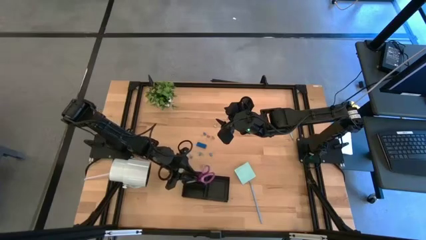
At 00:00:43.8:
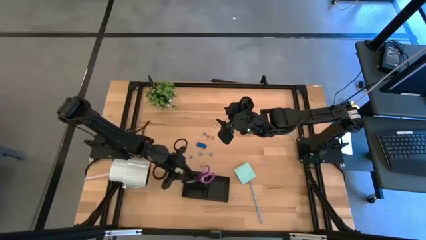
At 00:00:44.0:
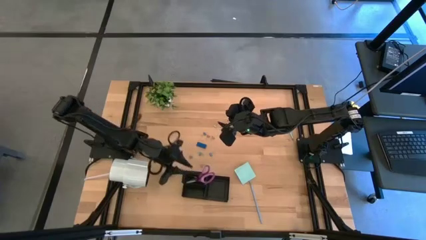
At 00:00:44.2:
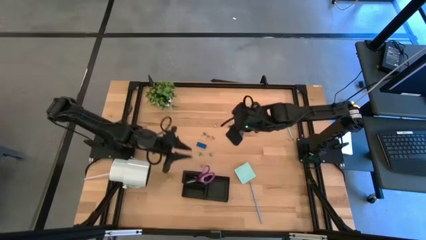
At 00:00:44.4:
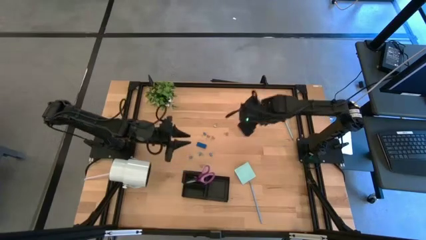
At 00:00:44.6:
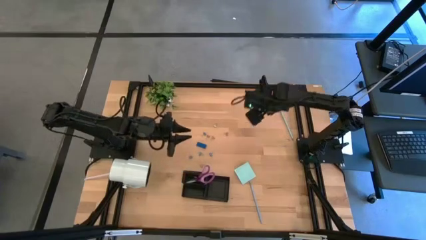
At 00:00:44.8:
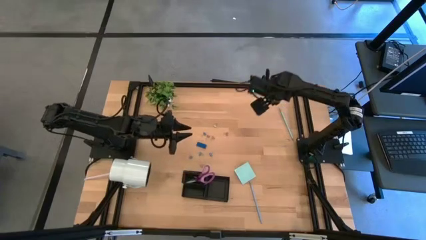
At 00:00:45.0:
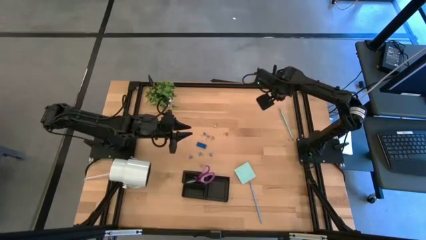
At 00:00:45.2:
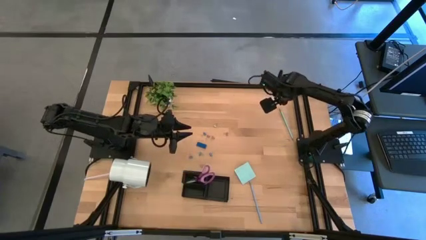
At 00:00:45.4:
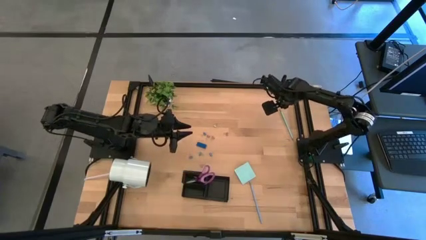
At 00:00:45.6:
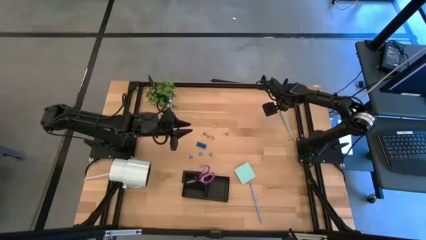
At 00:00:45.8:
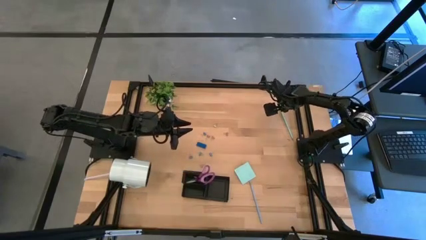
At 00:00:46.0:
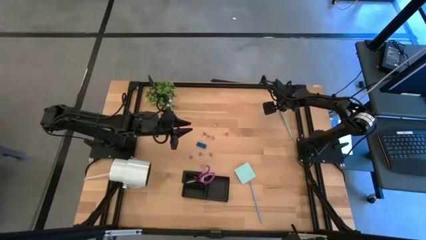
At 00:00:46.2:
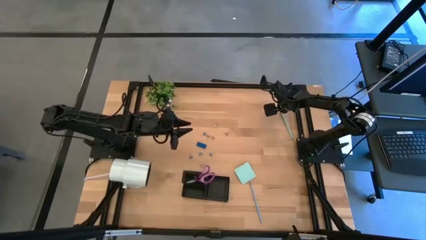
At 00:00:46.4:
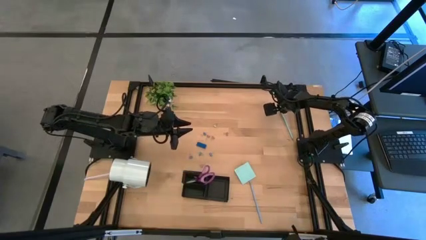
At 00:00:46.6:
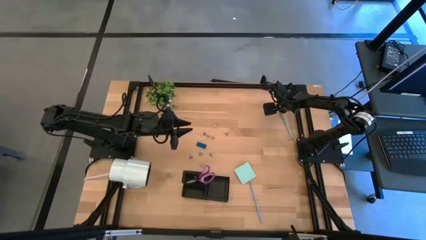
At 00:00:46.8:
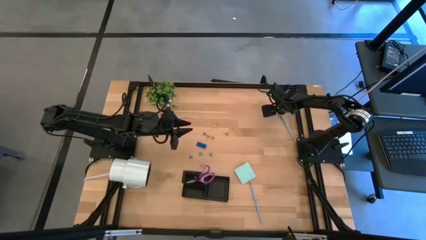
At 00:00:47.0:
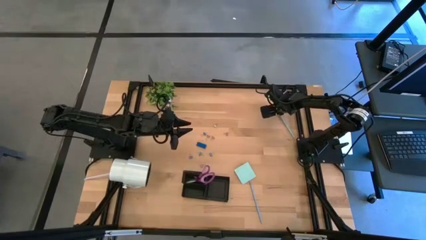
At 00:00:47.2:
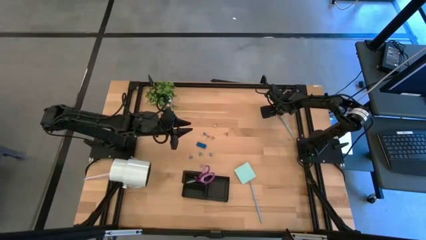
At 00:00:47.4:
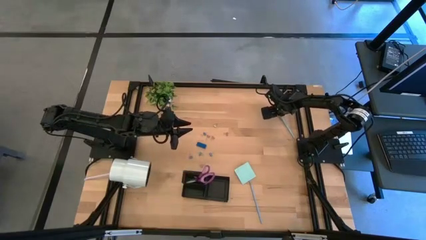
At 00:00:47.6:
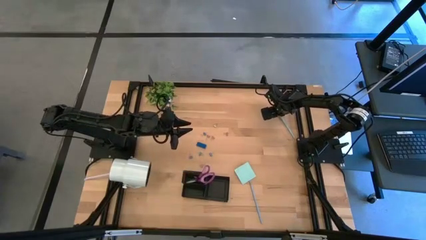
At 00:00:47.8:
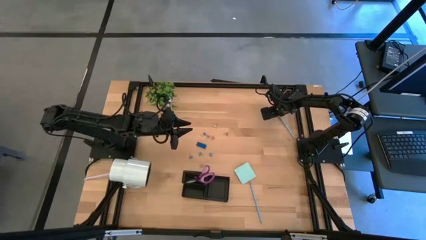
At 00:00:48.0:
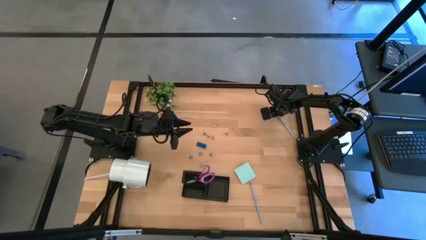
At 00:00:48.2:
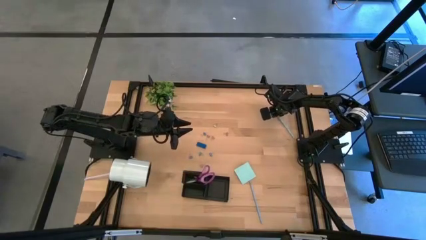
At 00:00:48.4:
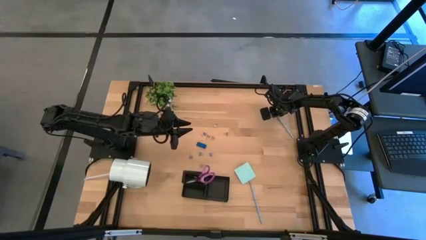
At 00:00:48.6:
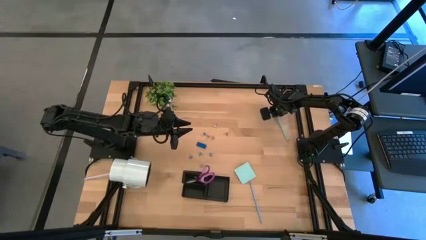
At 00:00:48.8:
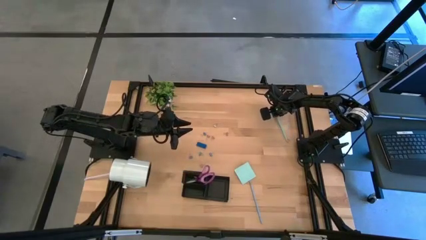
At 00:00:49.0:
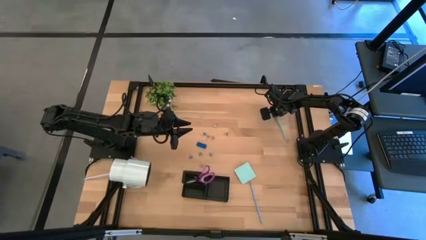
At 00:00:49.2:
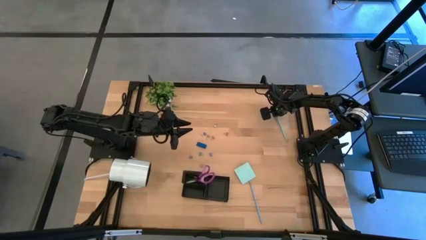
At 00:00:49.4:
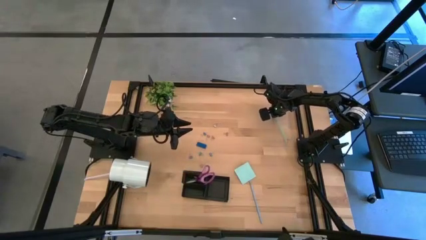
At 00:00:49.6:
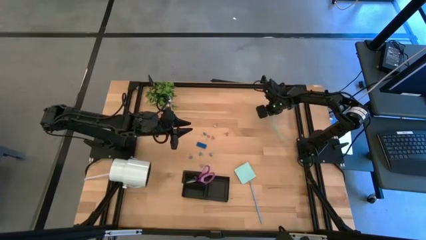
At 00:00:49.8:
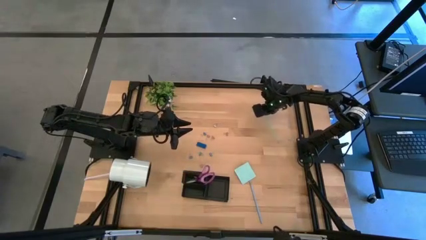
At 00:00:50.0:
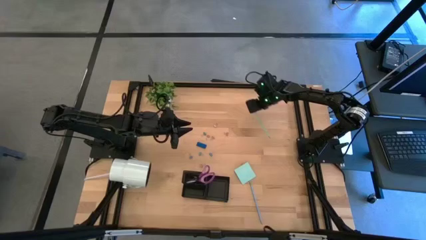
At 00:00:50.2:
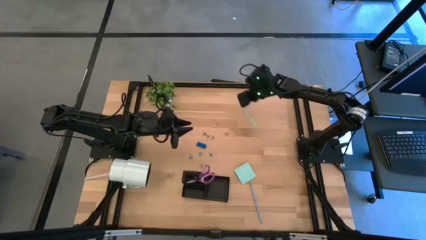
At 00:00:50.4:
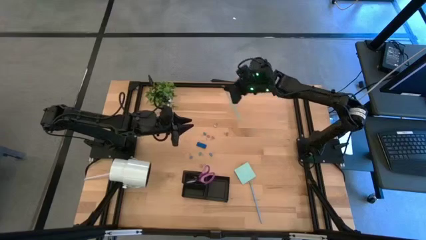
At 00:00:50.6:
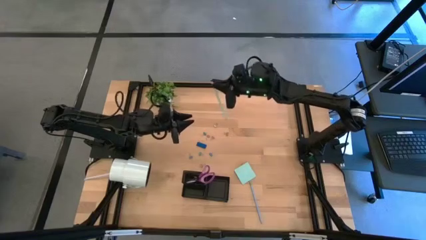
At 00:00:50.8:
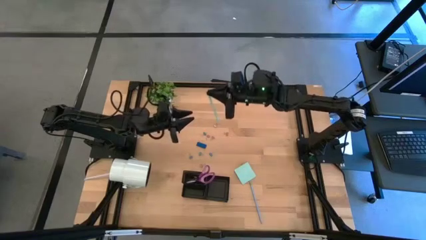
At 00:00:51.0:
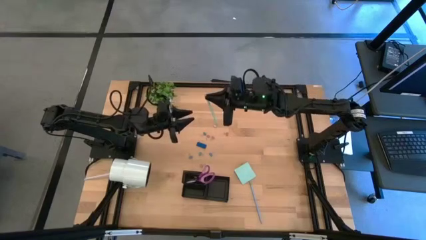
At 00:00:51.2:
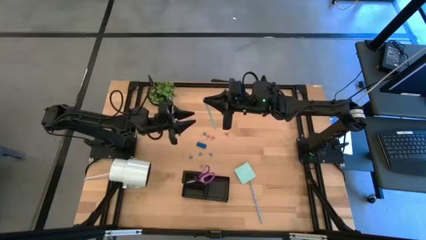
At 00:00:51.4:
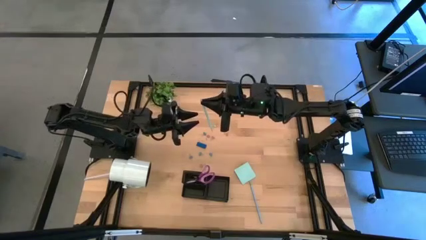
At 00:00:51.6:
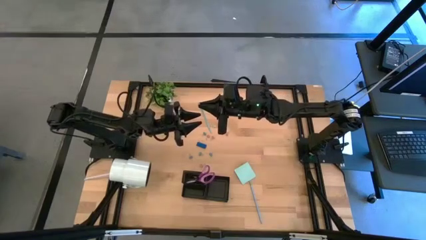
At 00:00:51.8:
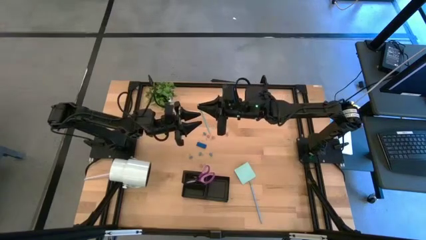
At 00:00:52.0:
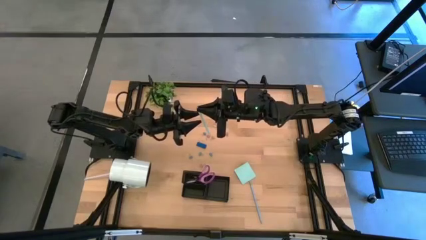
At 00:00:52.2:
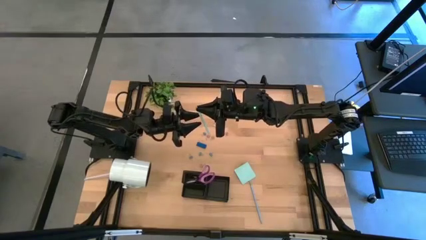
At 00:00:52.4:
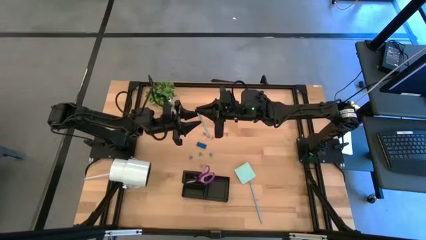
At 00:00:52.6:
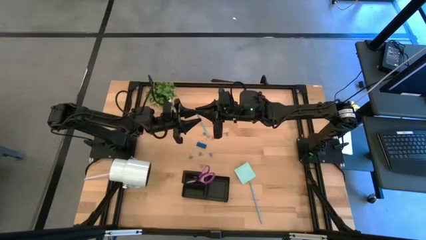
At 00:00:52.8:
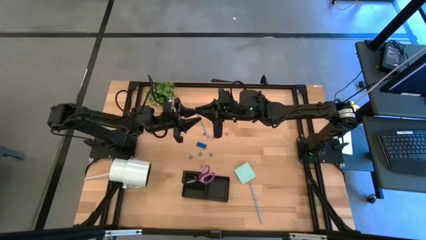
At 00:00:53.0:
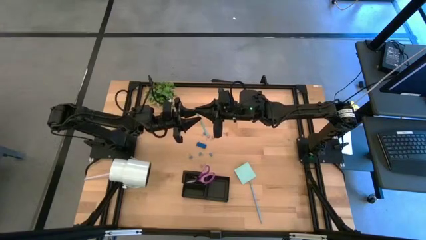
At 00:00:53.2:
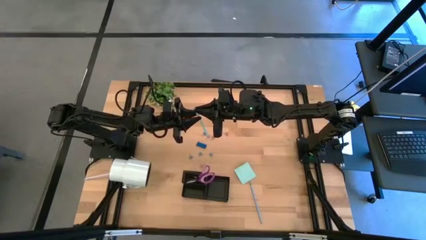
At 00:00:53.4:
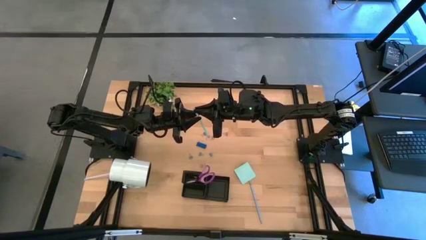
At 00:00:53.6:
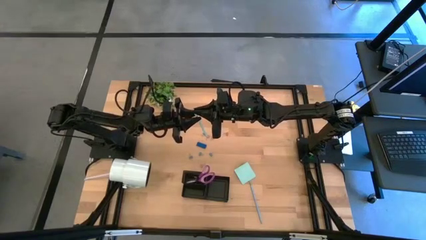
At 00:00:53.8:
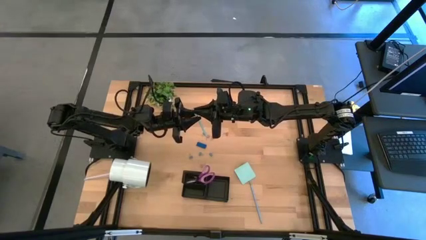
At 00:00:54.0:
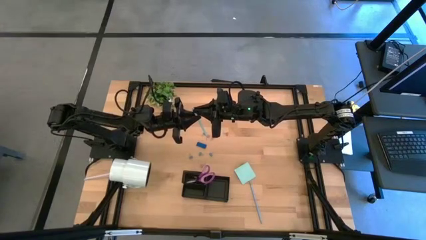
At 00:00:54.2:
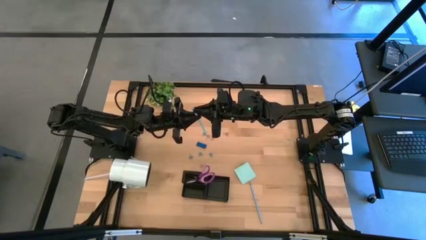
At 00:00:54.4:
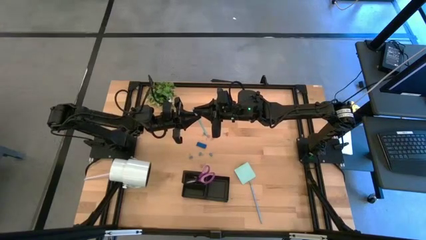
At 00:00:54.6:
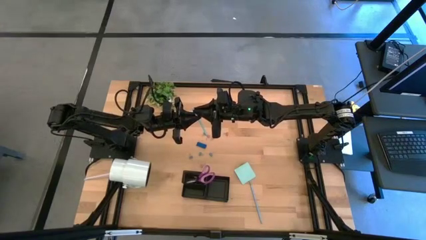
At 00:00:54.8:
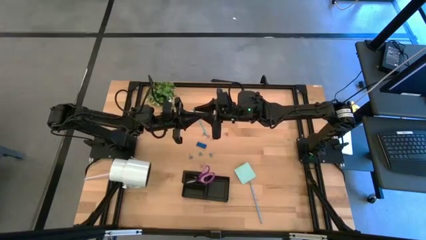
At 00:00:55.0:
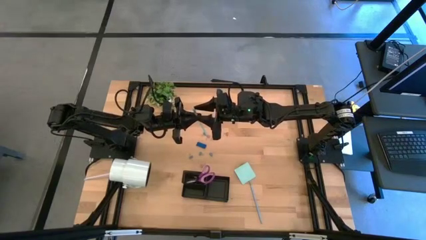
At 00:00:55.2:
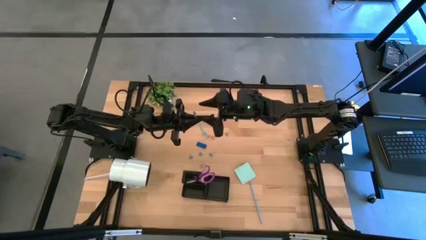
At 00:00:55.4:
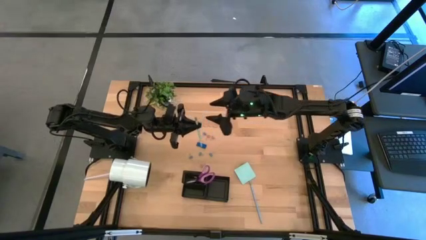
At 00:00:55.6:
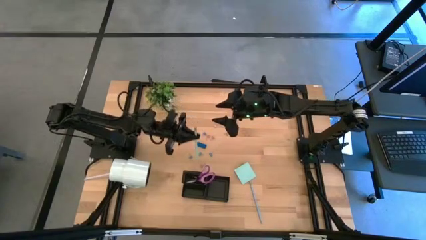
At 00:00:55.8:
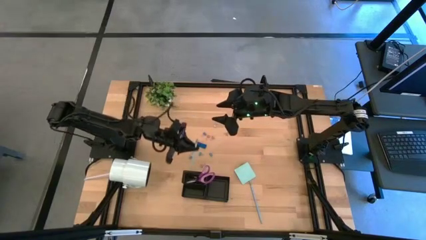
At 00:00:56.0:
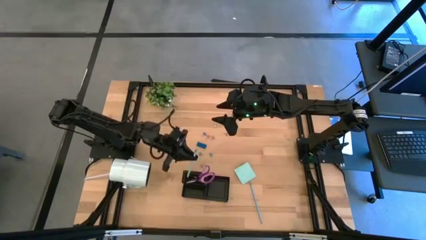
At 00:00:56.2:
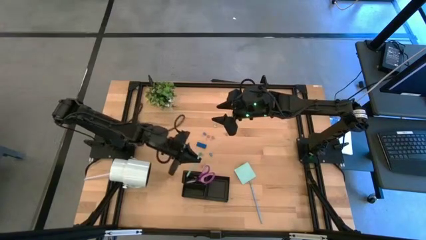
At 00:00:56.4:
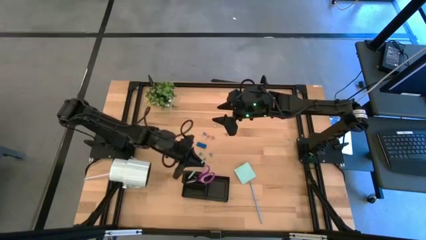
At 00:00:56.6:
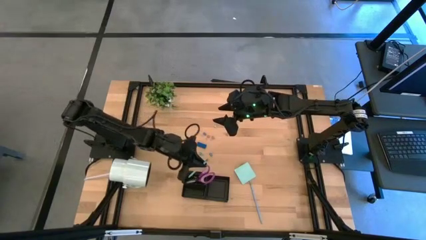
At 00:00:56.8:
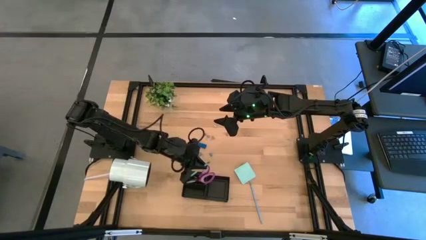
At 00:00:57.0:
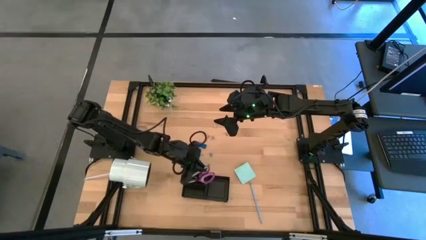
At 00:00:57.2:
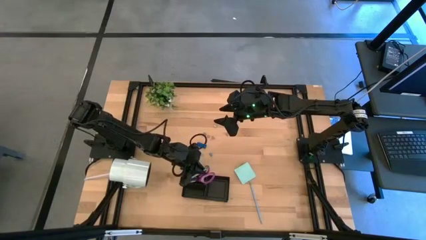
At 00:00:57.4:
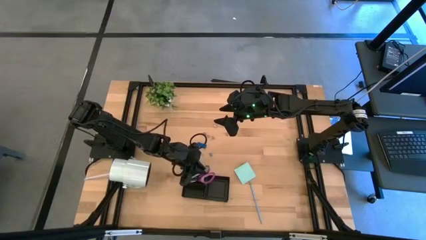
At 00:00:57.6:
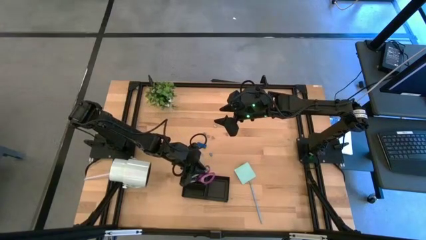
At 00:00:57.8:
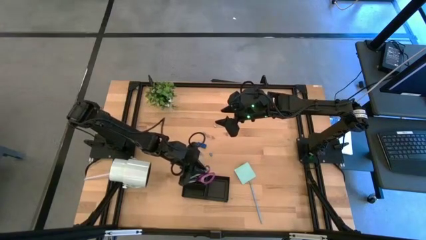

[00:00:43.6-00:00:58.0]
Task: Pick and place office supplies into organizer
Put the light green pencil into the desk organizer

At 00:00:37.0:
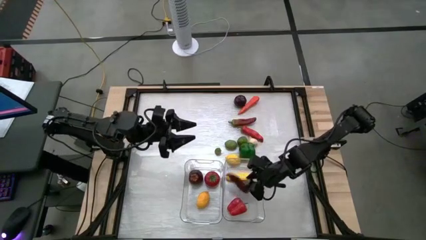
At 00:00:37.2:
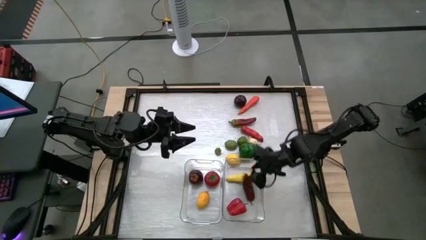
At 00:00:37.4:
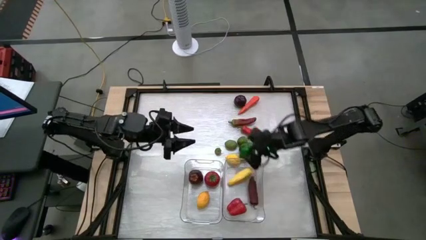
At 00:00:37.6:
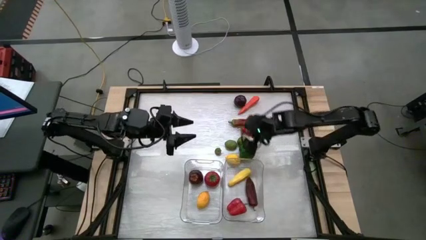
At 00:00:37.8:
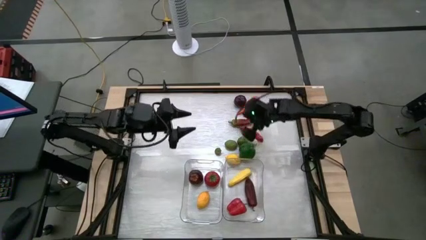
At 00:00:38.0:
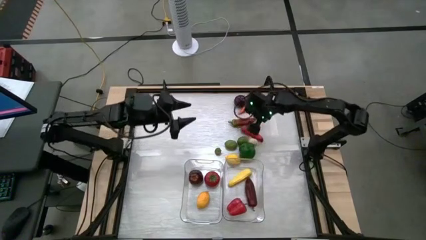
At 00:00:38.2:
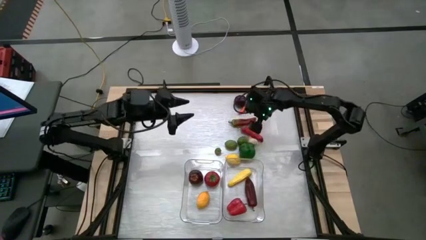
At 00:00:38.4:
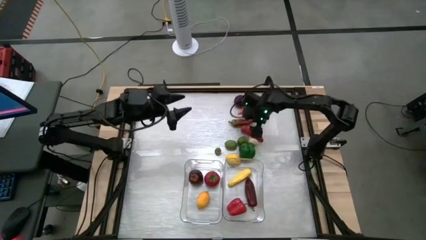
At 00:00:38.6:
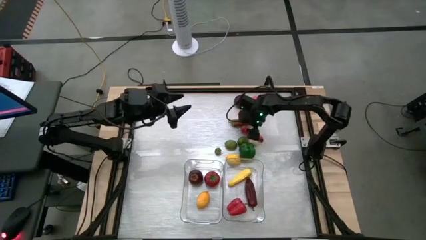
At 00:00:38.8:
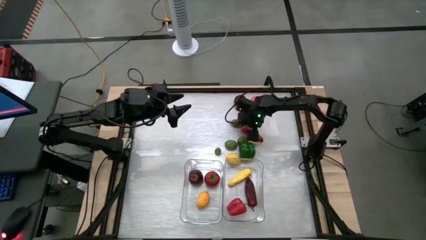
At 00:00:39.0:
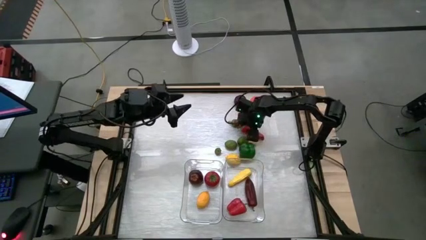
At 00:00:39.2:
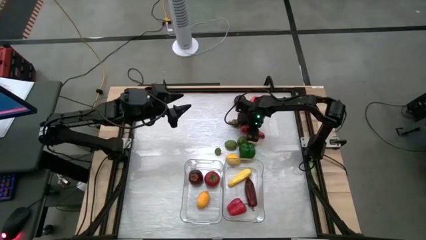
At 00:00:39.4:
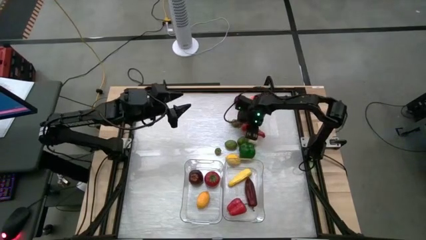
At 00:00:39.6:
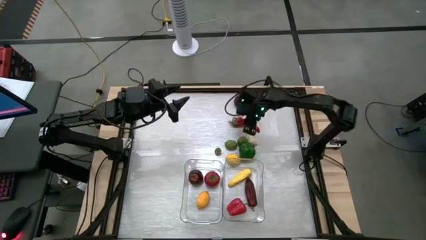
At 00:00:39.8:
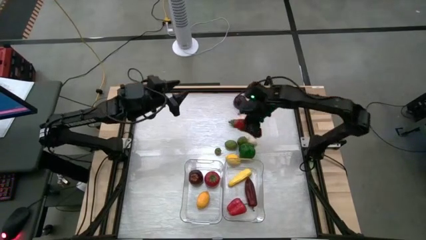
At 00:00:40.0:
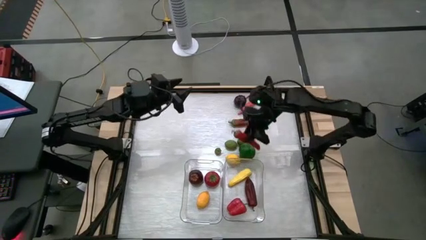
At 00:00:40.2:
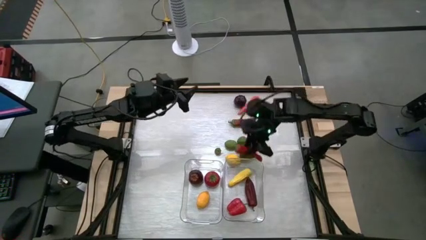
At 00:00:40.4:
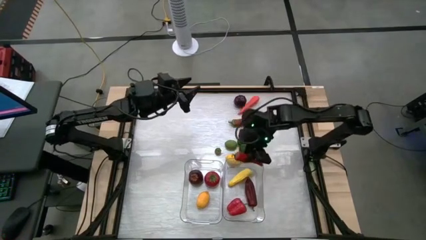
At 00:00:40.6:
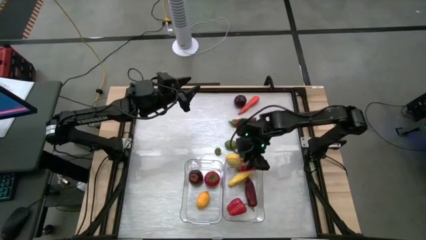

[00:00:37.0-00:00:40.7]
Task: Sort produce into baskets
Put the red chili pepper into the right transparent bin
